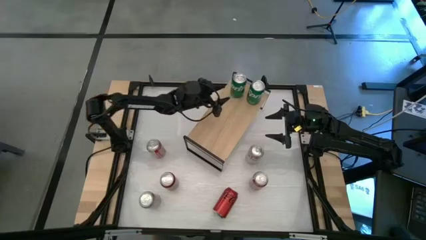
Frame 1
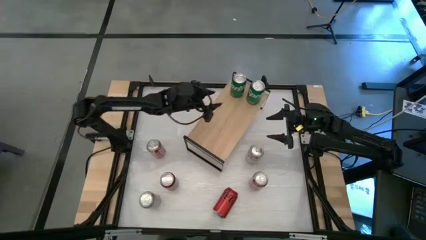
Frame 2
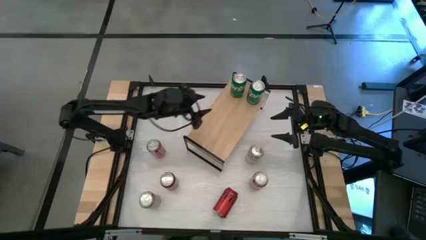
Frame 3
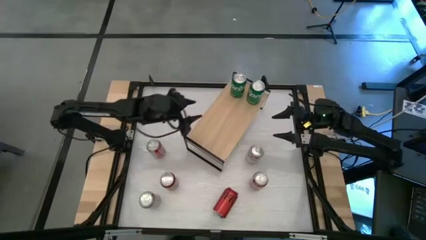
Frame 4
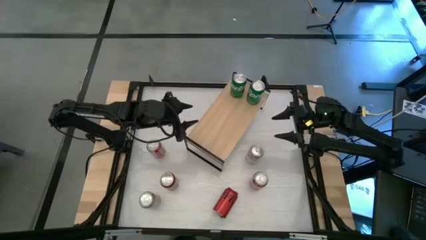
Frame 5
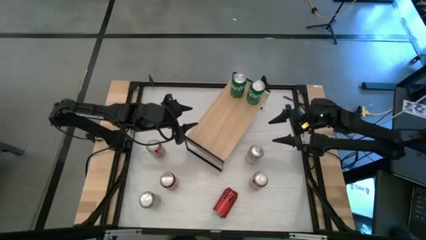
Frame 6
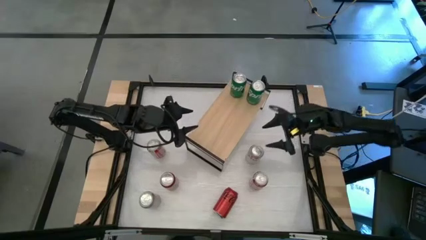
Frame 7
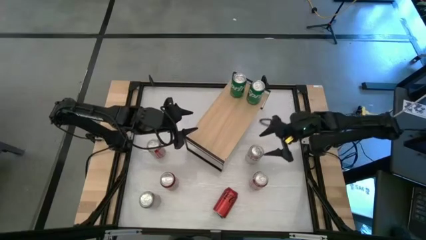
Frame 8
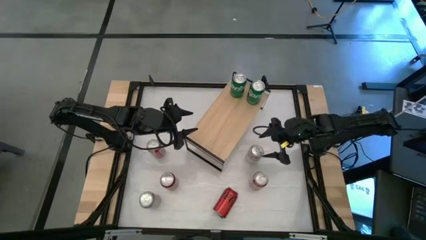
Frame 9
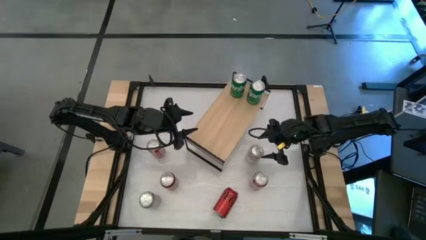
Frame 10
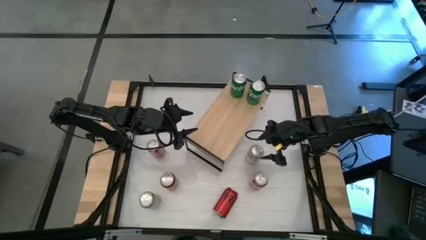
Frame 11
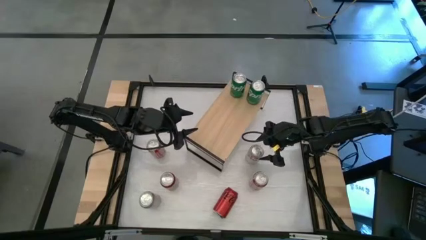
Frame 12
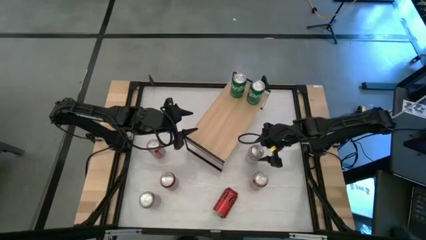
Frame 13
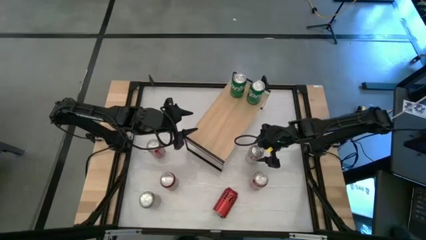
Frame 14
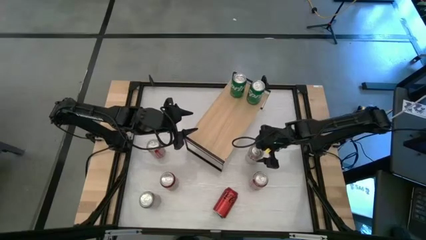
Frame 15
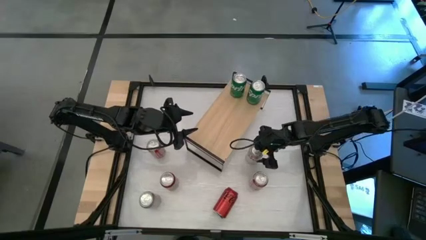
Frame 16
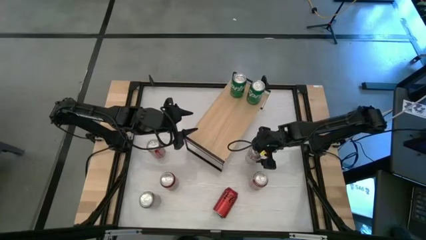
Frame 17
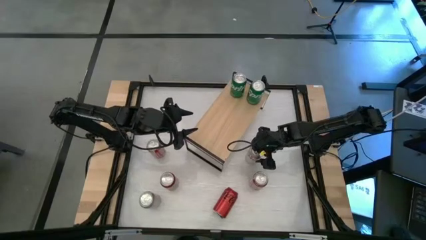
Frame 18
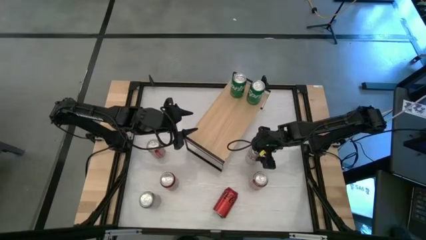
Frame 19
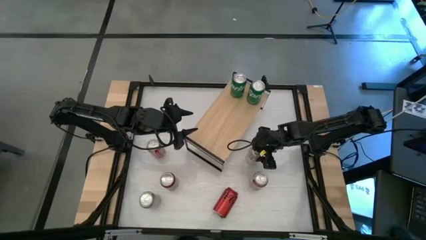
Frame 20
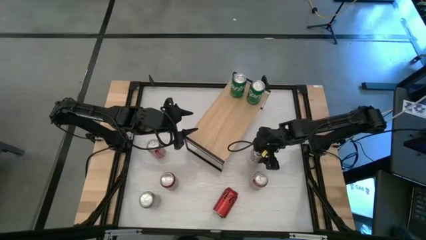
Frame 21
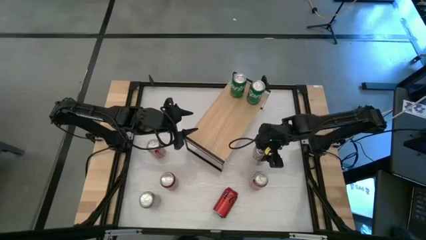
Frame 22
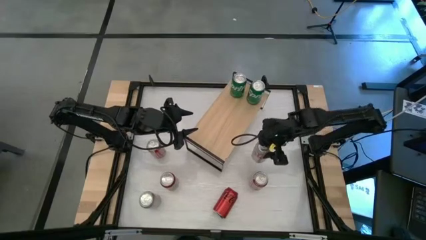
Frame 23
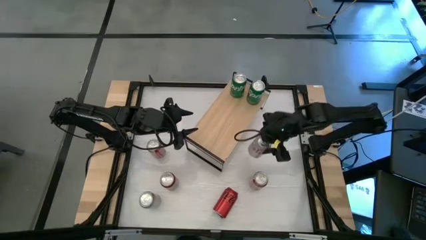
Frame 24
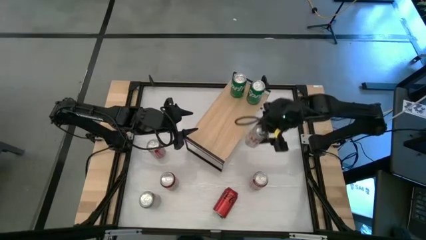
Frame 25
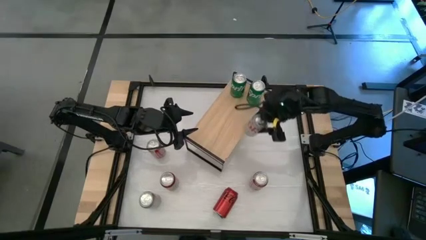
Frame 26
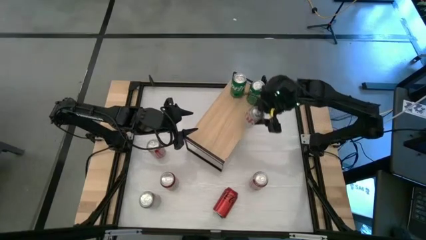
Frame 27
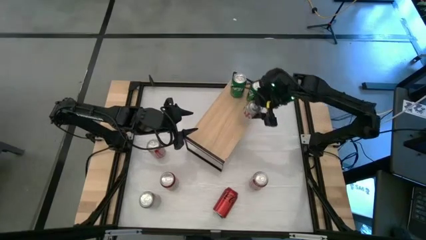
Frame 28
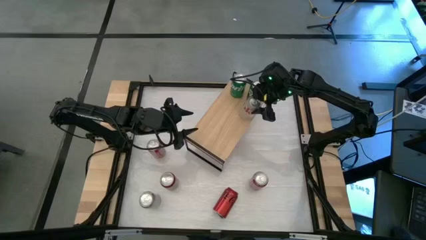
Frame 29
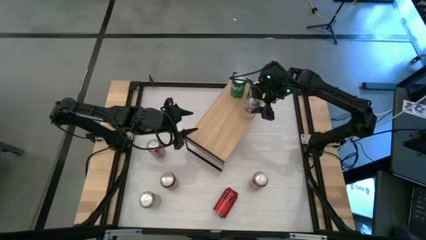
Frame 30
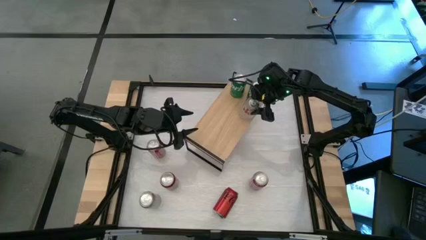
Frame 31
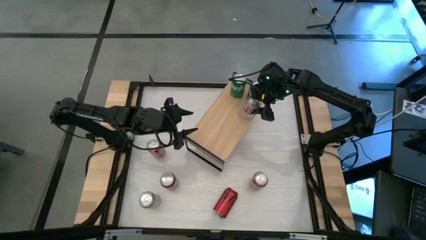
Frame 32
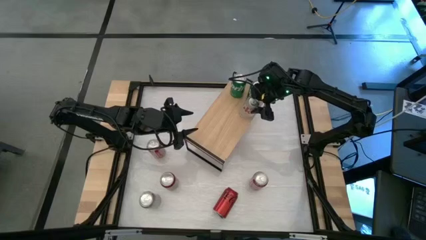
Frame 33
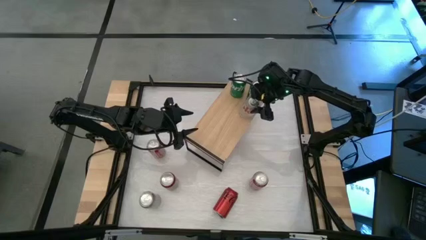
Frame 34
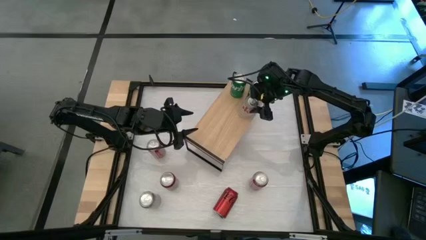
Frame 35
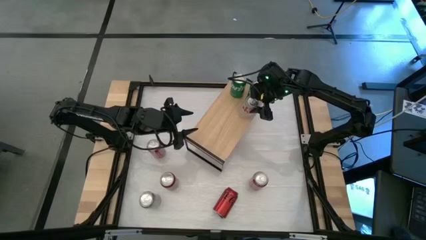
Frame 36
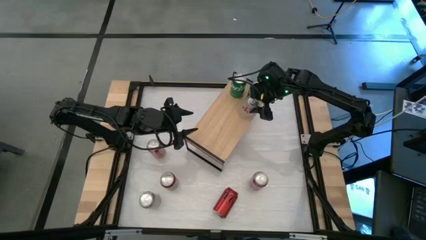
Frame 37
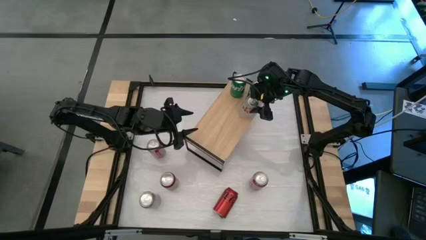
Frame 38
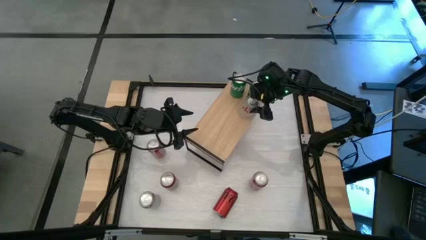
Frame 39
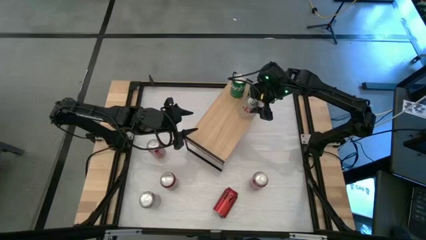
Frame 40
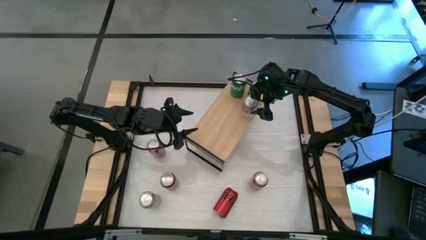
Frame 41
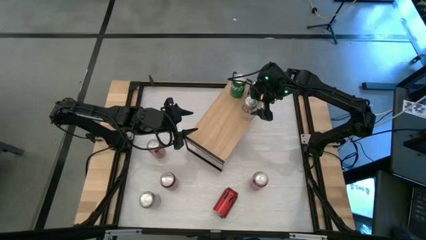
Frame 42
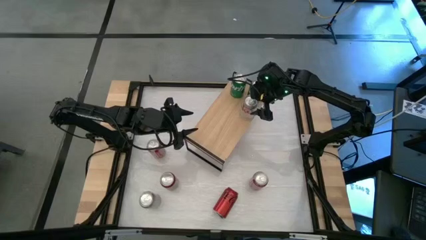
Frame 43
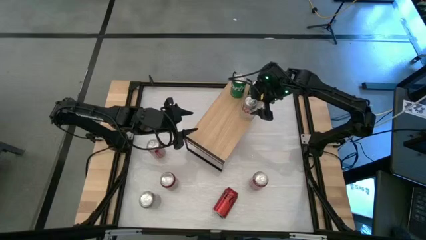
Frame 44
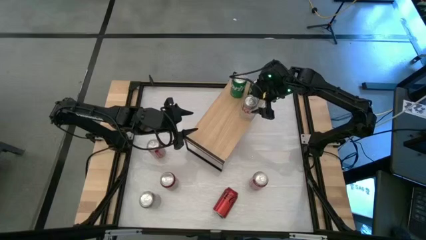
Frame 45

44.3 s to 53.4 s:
Task: Place canned beverage on shelf
Put the right red-silver soda can on the shelf

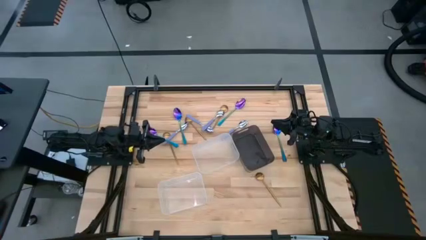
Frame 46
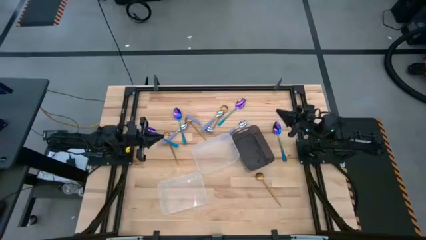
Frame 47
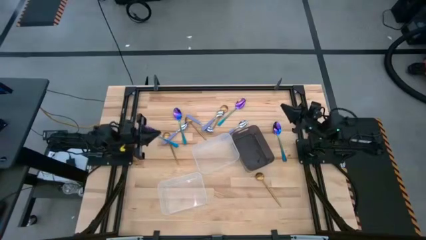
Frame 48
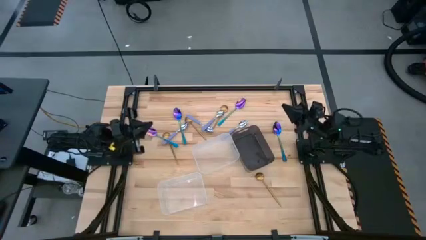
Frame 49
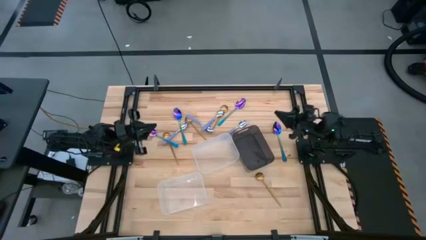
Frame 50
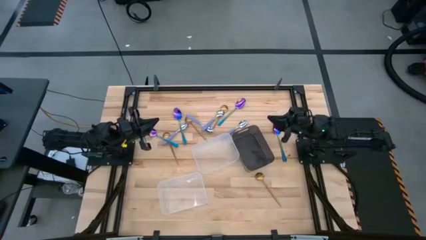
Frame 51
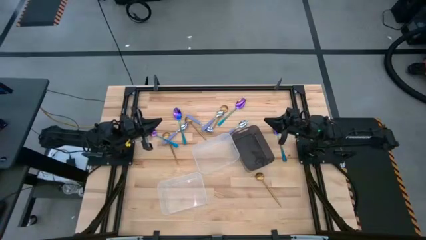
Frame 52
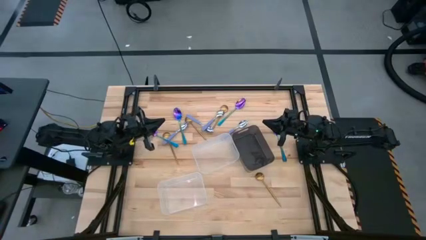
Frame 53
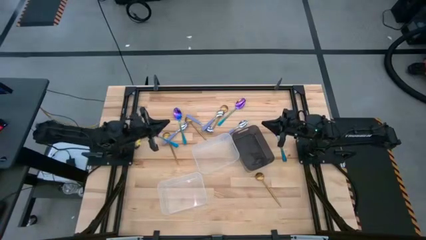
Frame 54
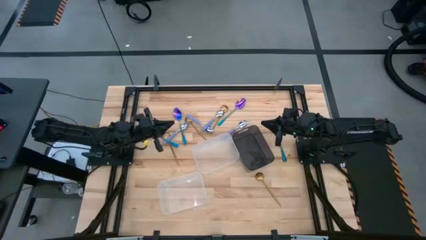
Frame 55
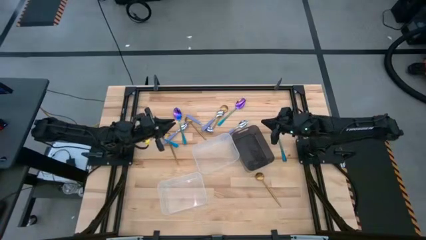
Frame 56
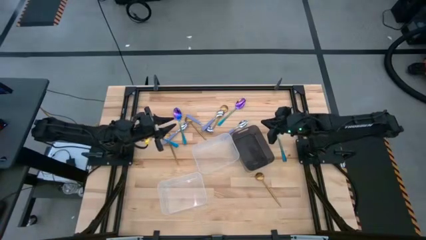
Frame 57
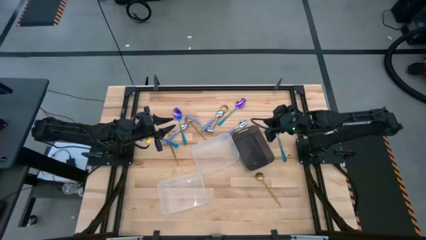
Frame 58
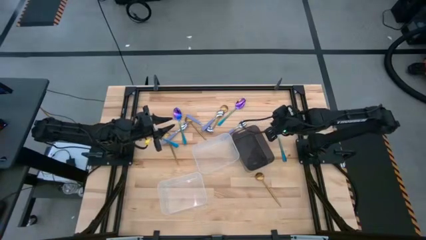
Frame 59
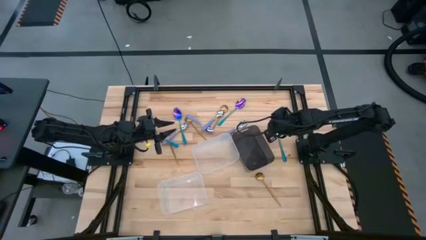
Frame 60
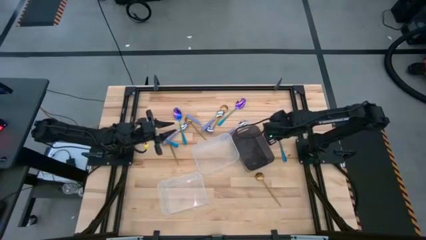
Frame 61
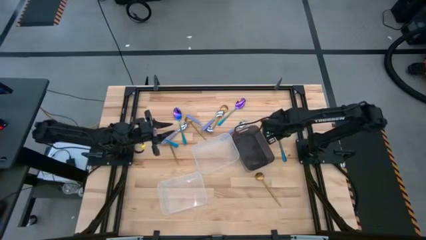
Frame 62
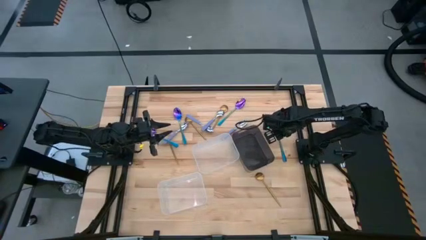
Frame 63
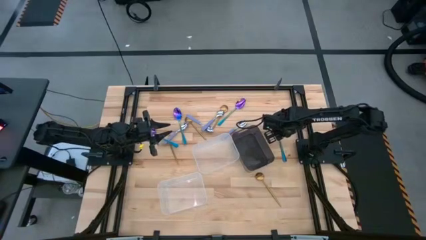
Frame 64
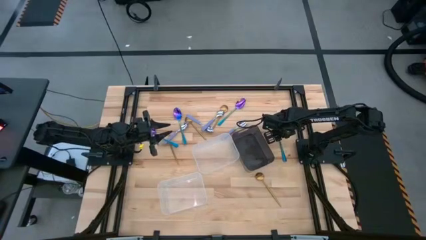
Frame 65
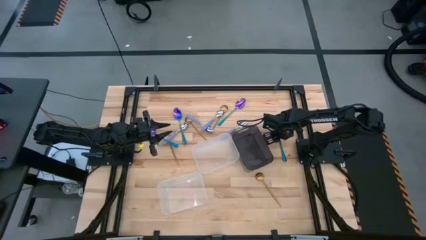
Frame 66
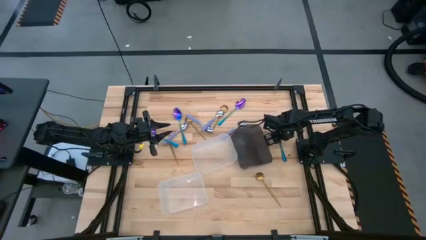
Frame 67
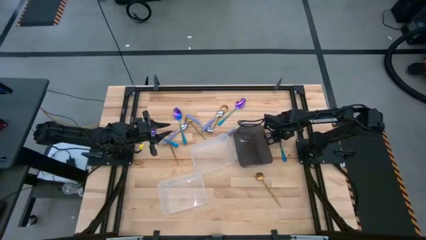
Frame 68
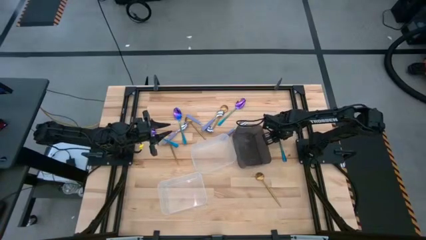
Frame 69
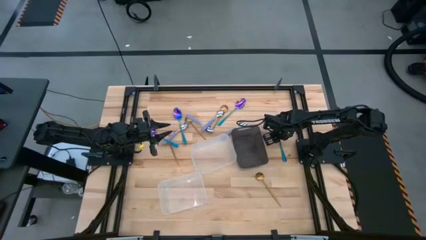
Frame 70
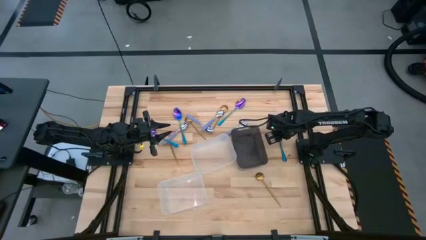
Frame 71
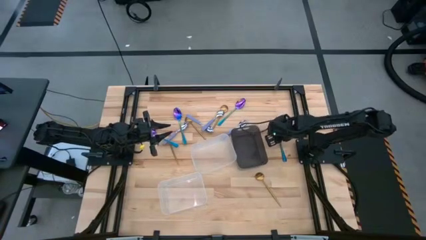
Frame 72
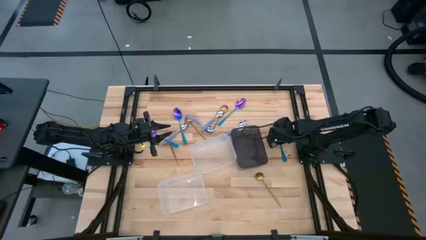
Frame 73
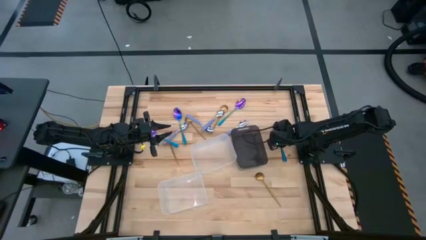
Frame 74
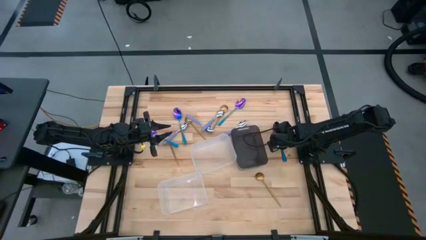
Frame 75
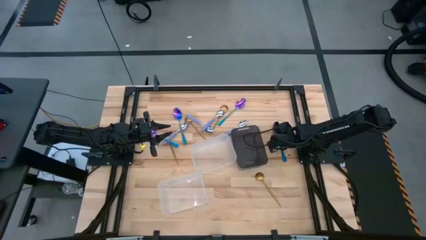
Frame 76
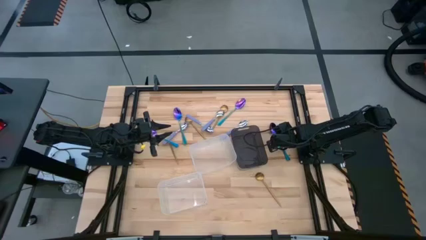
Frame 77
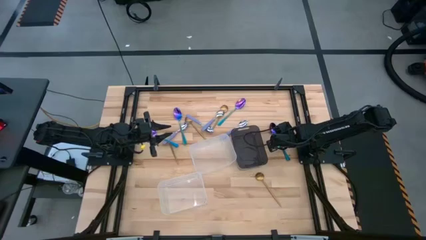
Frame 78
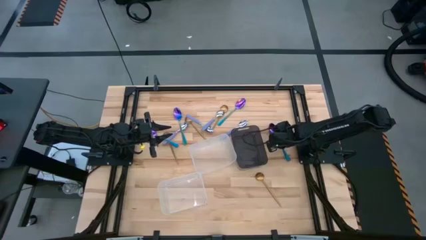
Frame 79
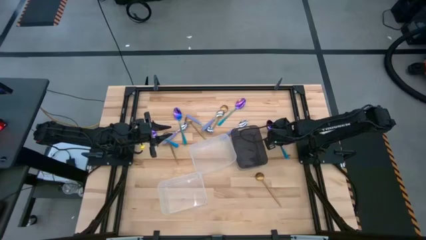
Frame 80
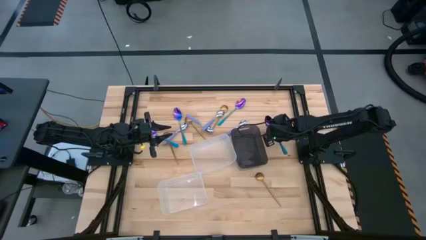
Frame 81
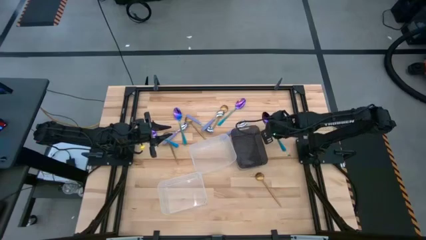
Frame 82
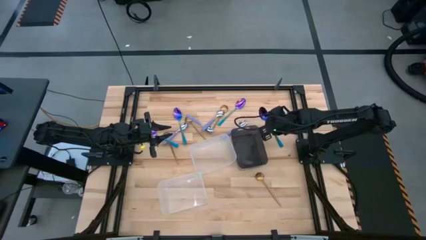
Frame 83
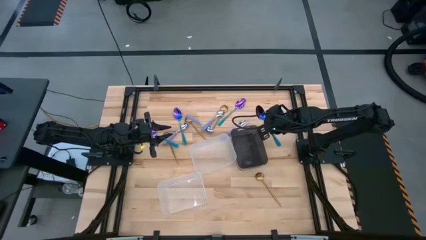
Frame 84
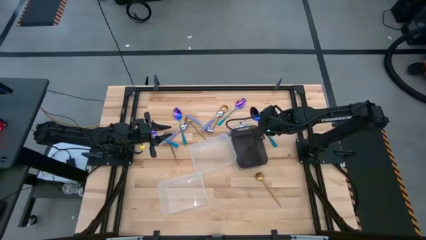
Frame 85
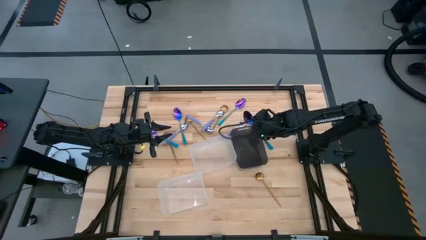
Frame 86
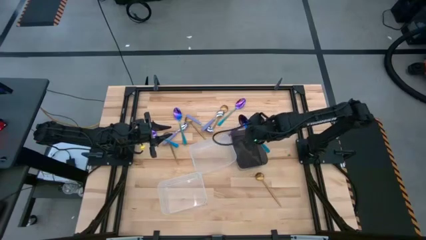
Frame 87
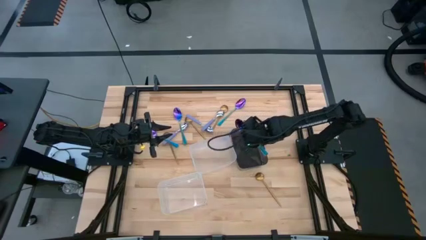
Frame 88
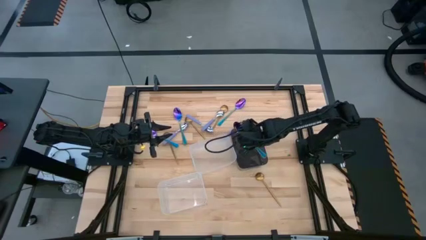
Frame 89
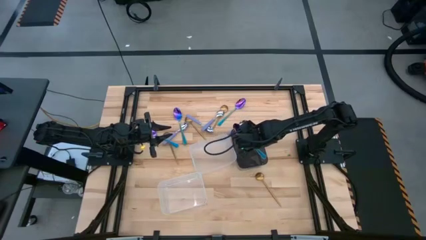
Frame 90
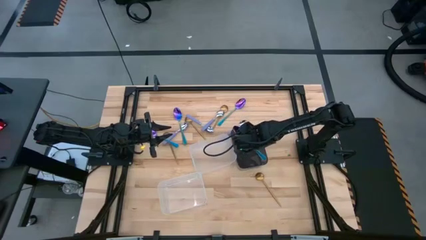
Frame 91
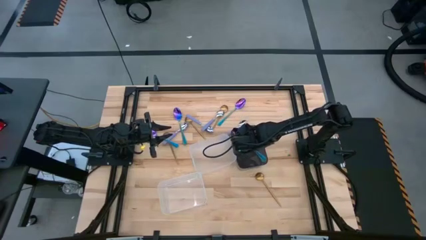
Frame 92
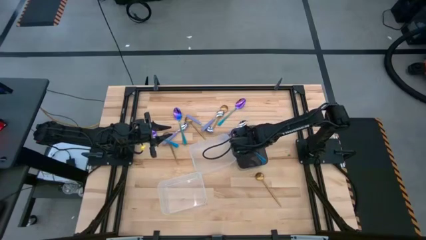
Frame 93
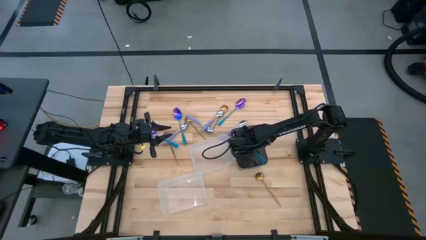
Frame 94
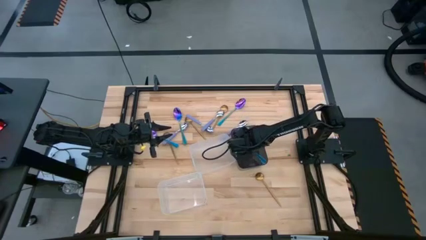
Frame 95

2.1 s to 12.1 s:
Task: Sort silverware by color (type)
Put the violet spoon into the black bin
